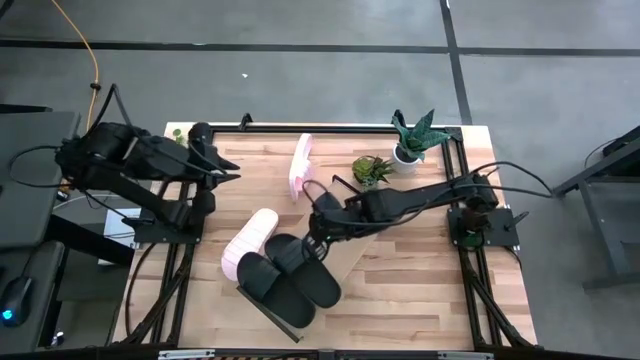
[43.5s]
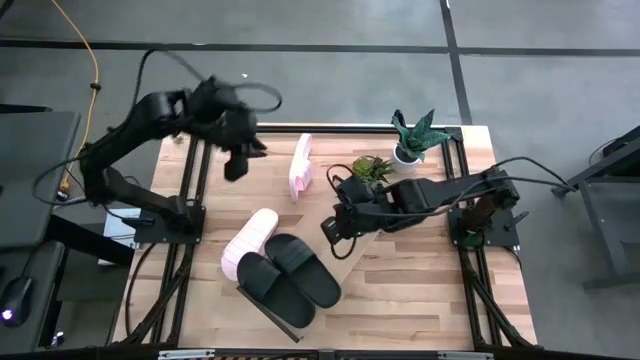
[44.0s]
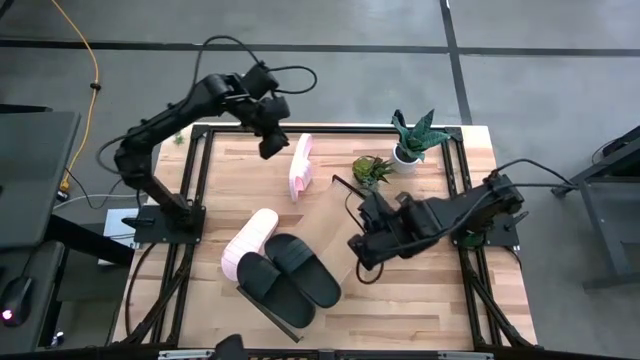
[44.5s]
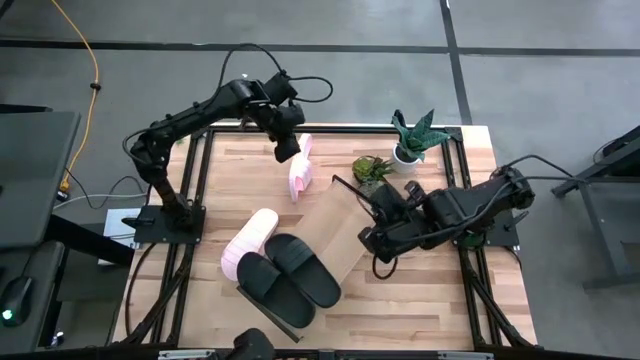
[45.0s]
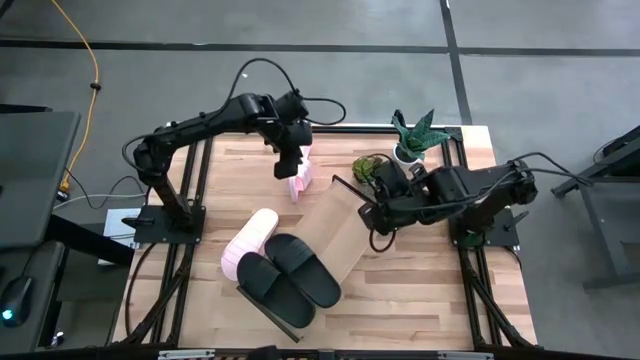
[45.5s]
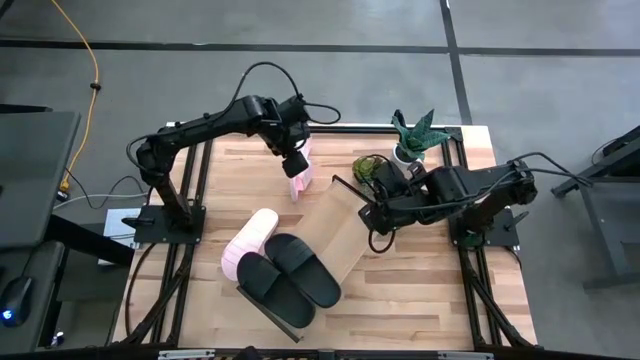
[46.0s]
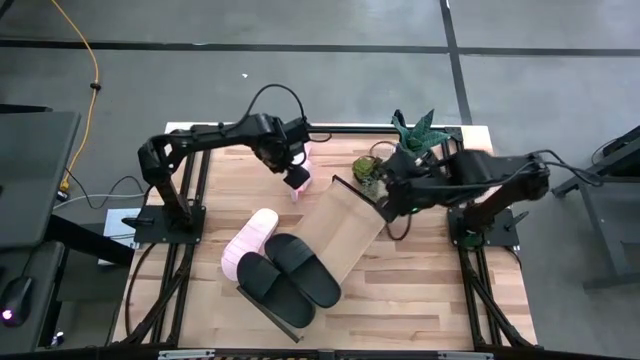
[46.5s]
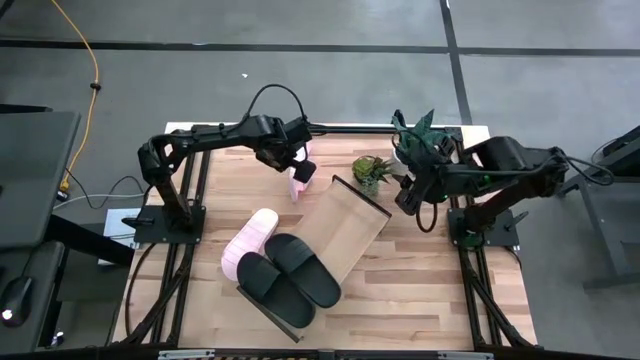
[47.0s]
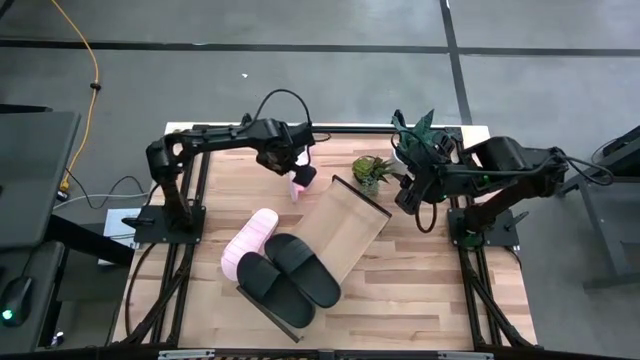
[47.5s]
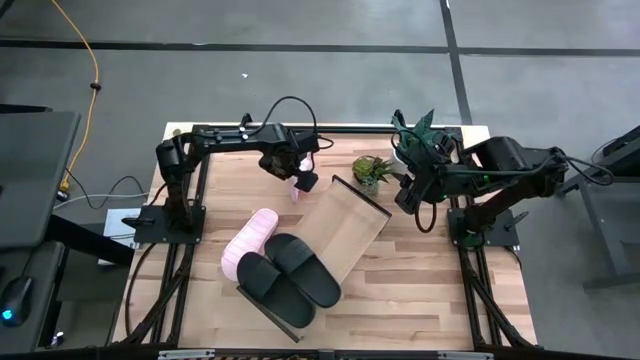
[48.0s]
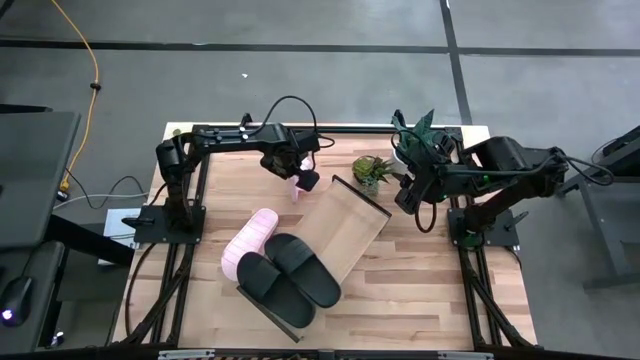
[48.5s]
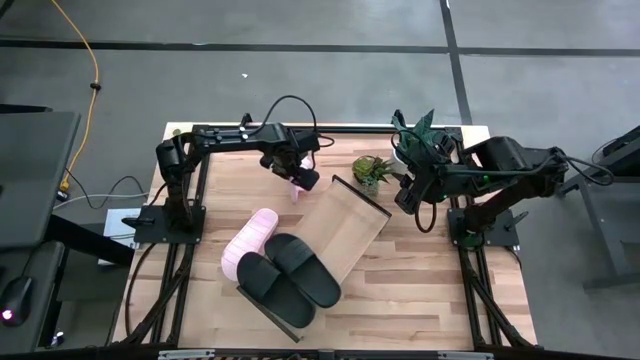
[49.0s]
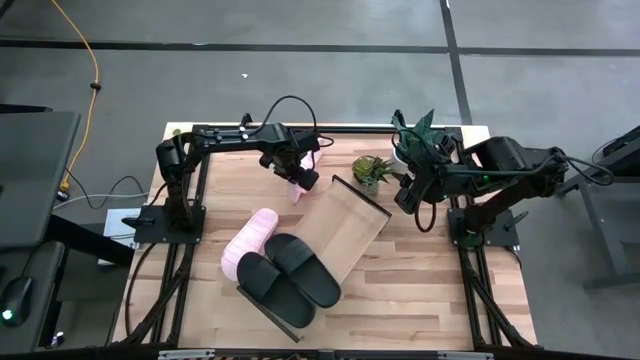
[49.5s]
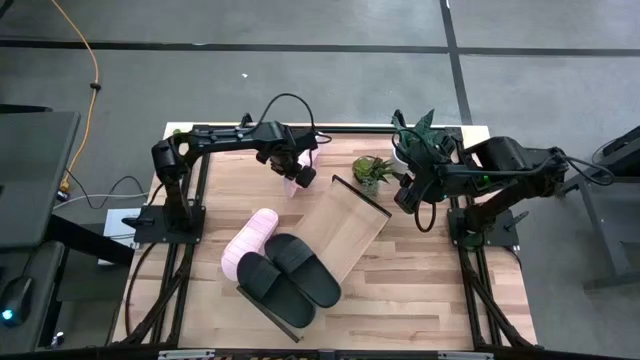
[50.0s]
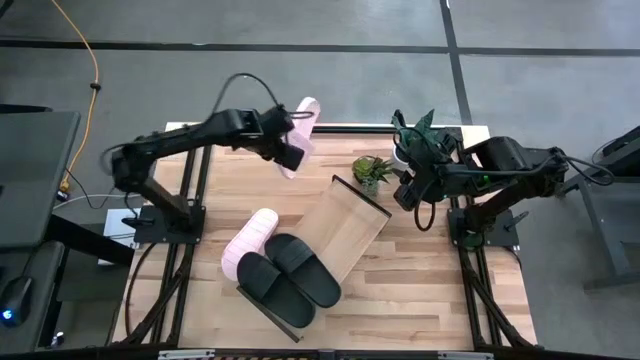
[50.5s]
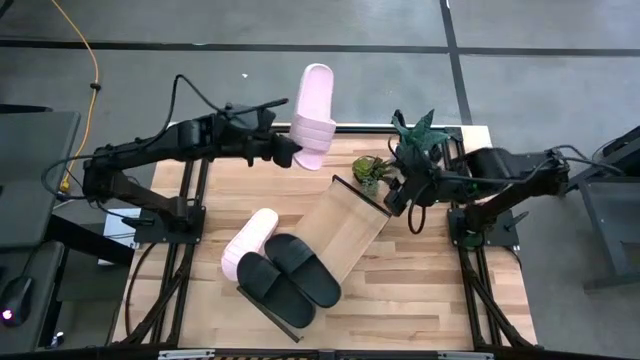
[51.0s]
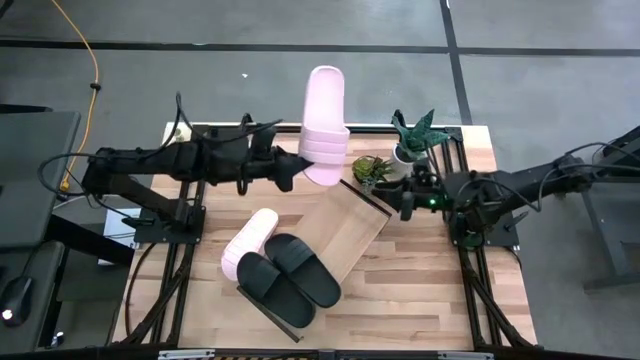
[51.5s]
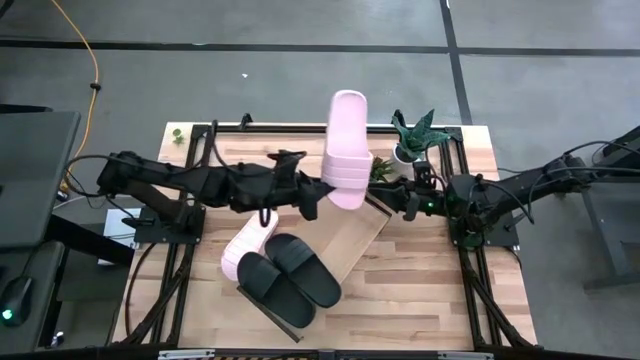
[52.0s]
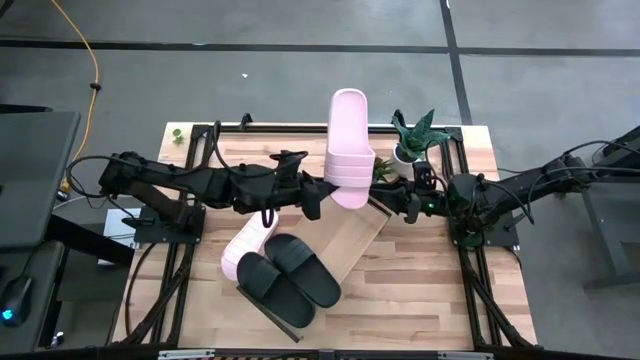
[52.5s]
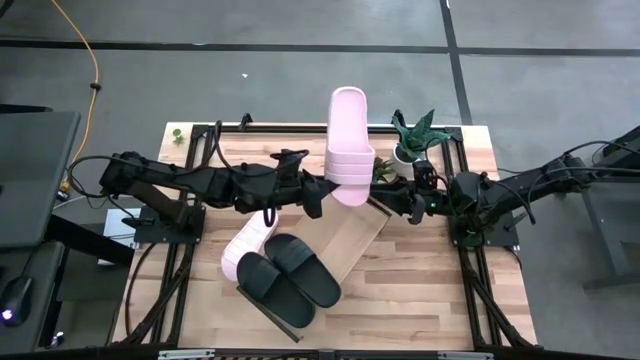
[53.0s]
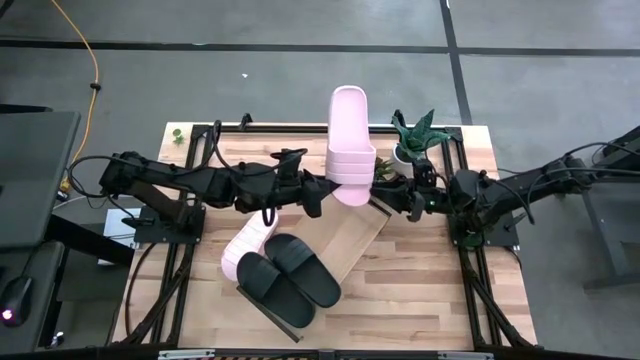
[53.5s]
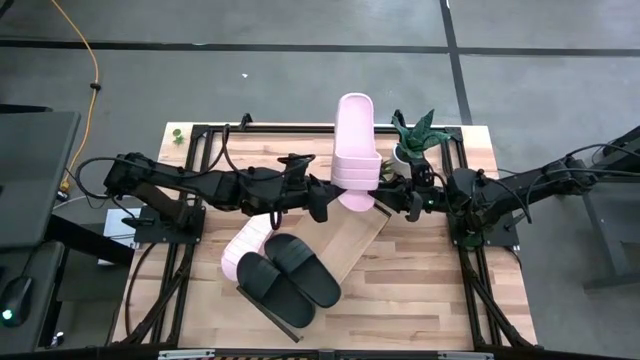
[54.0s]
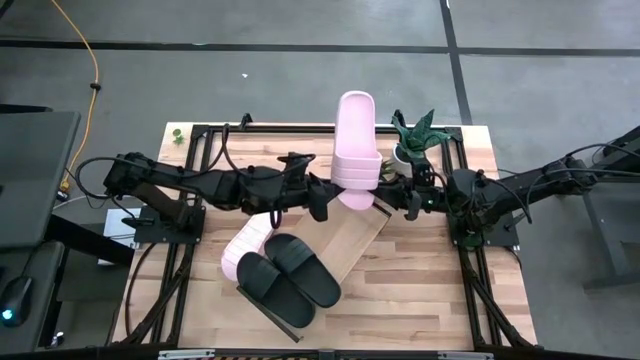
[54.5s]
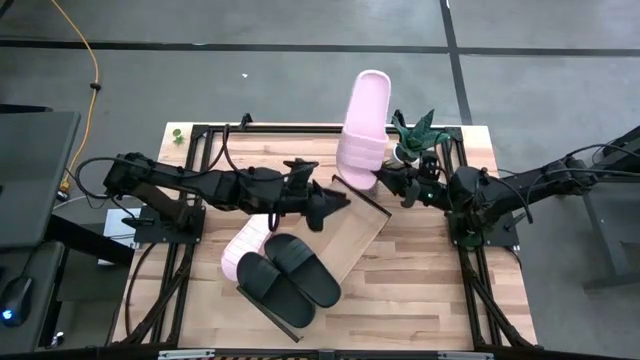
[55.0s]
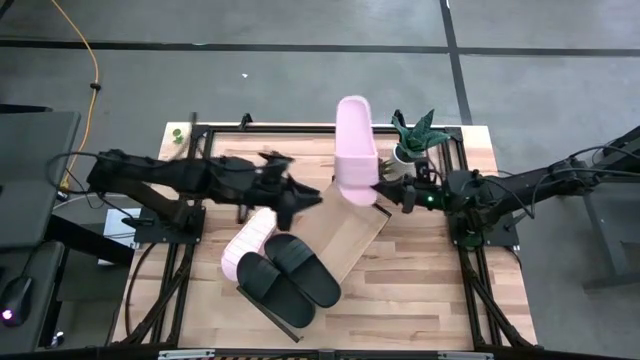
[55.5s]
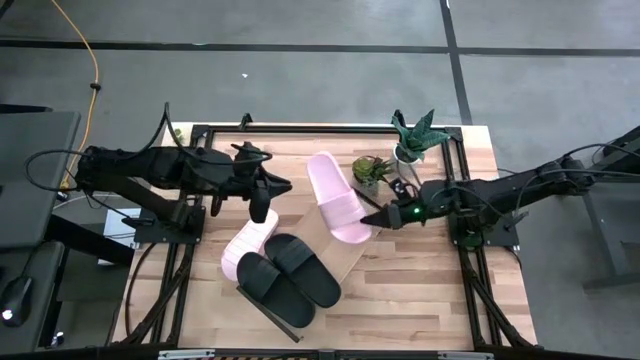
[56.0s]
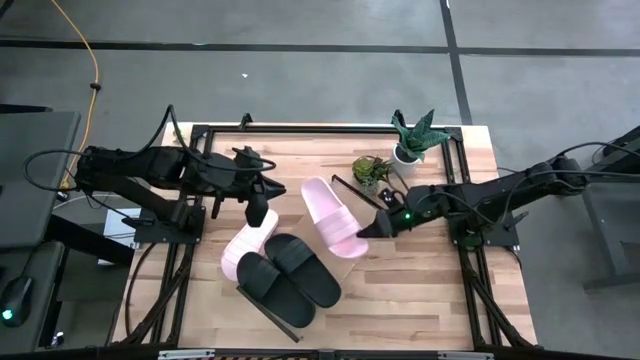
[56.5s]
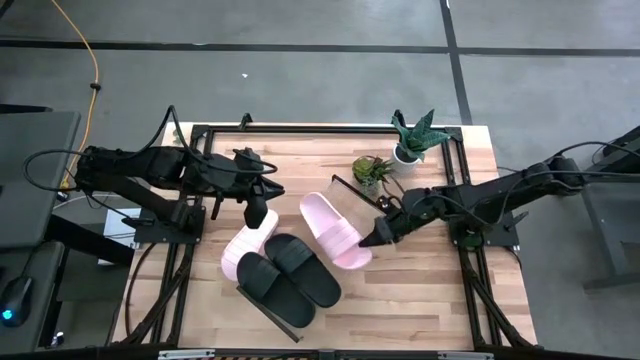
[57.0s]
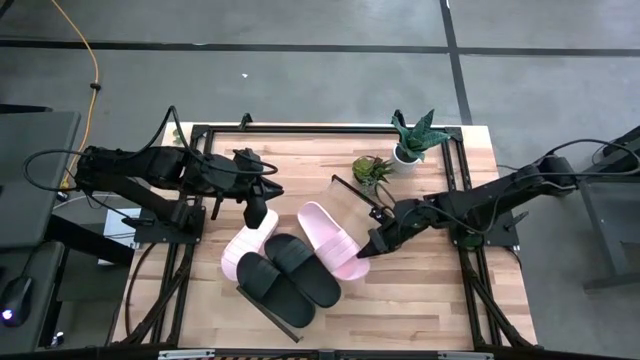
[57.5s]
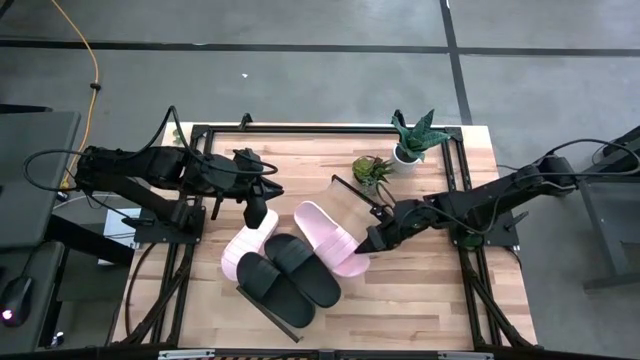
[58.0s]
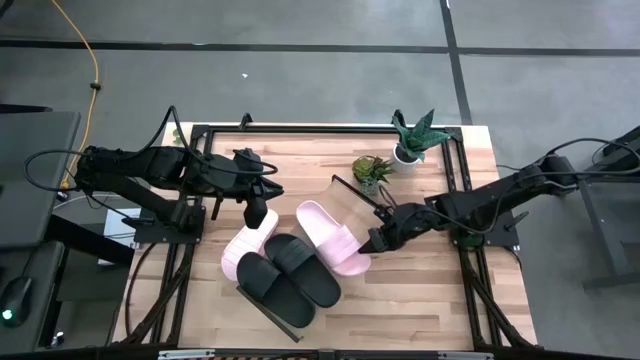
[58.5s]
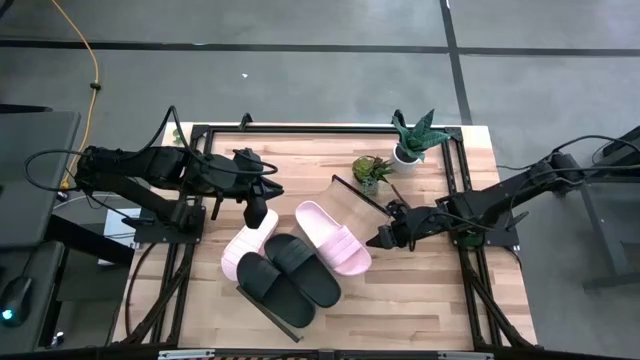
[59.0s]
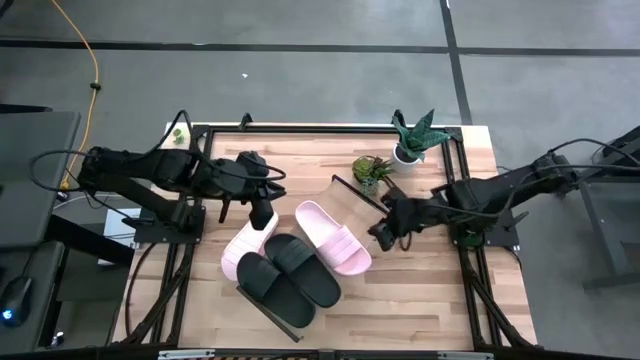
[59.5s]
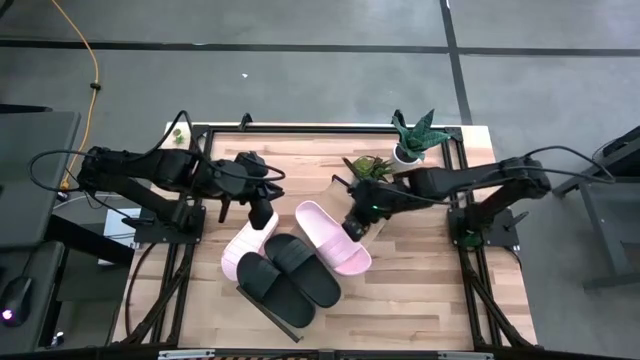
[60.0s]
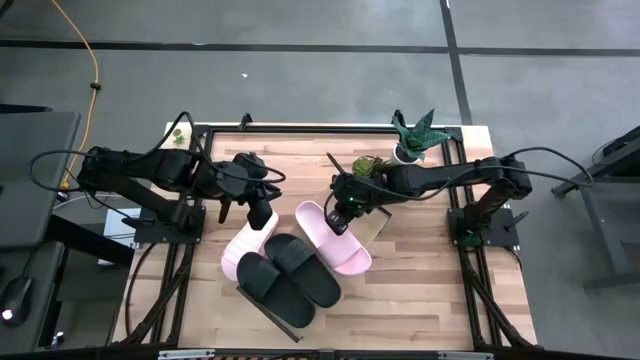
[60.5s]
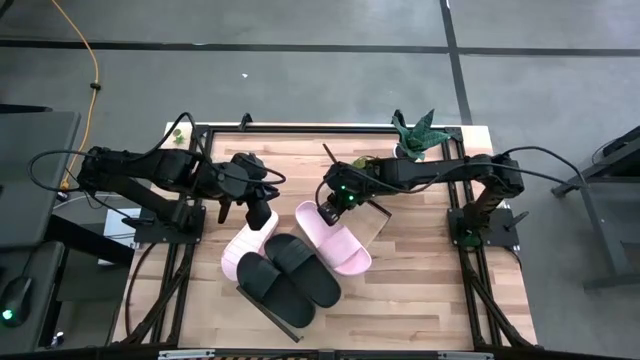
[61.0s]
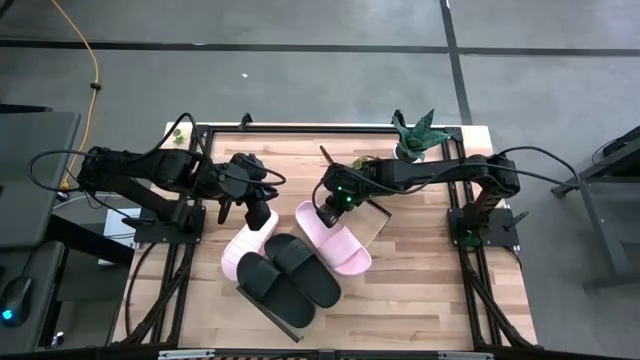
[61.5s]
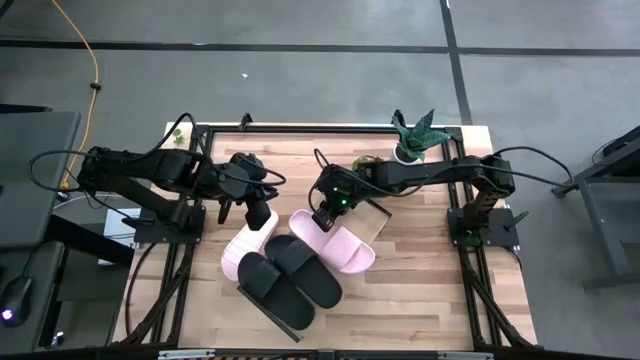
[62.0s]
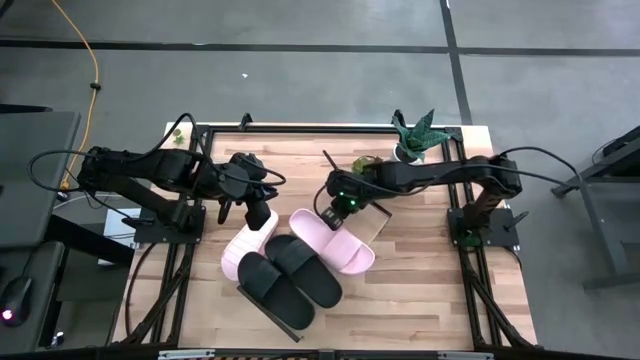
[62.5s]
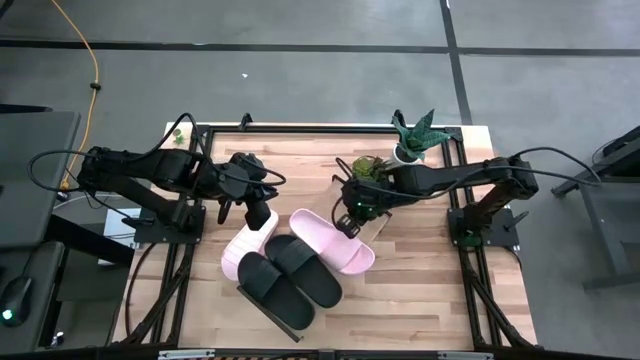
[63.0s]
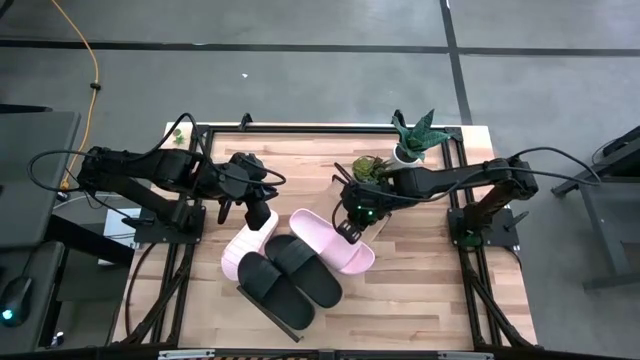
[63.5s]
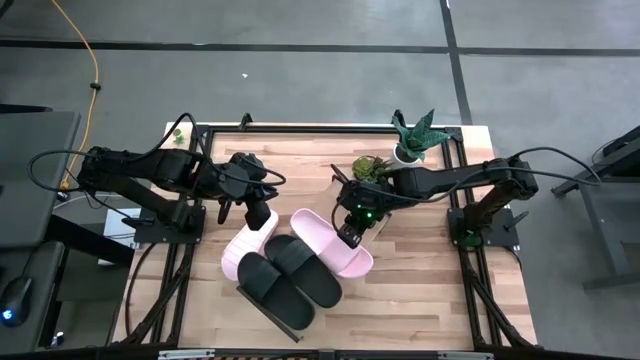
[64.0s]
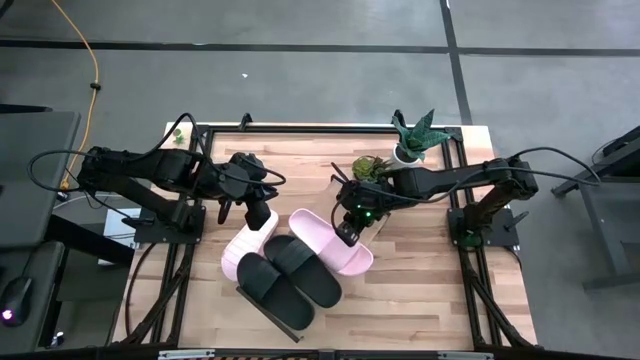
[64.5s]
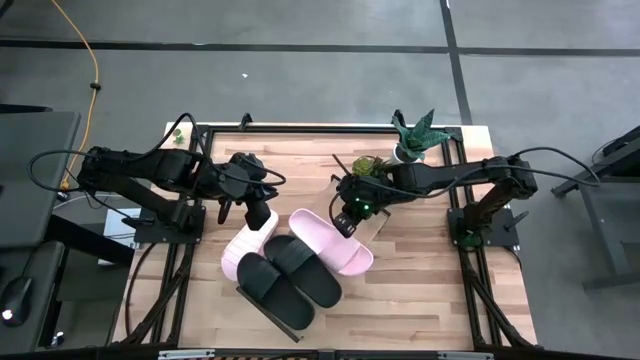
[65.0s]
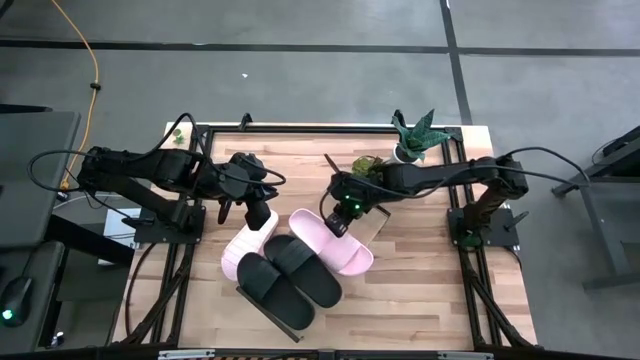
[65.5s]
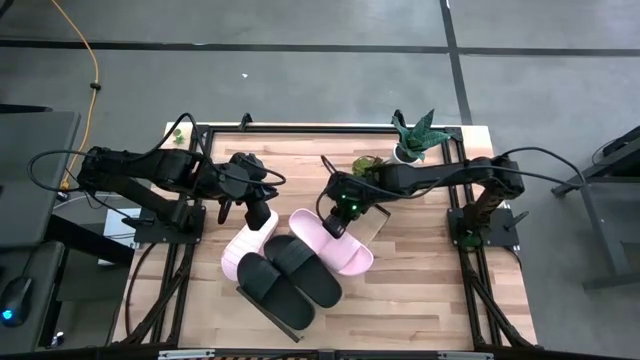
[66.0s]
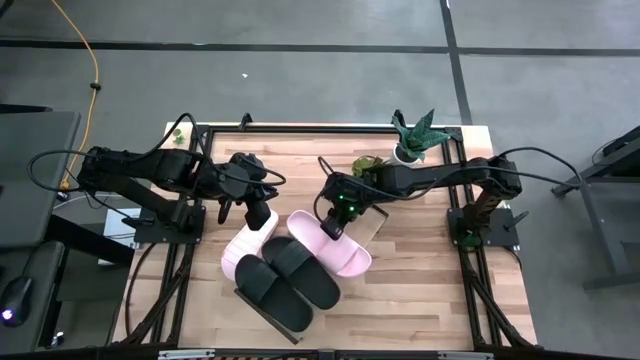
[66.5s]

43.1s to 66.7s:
Task: Pick and place slides into the shelf
Put the top pink slide on the shelf
